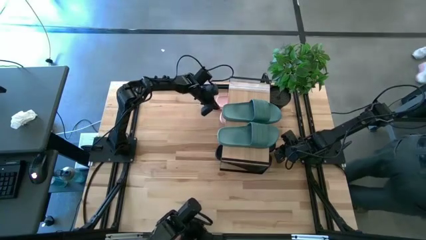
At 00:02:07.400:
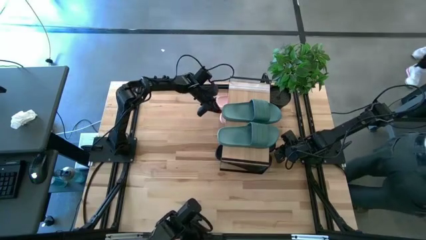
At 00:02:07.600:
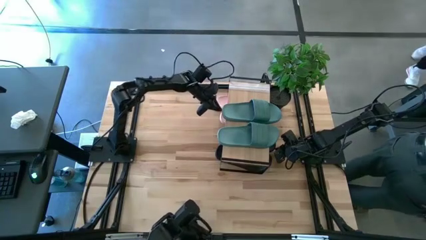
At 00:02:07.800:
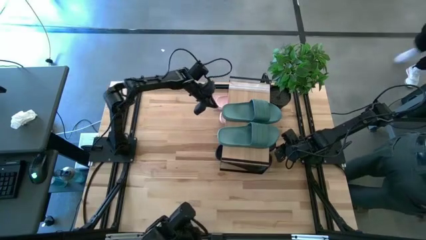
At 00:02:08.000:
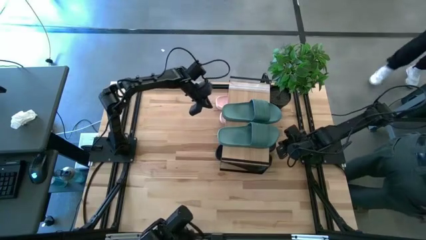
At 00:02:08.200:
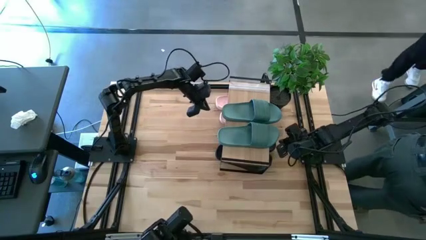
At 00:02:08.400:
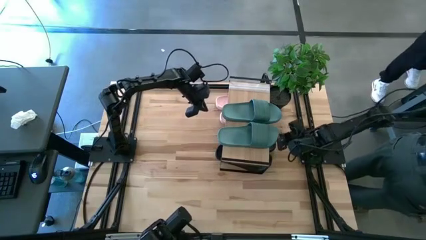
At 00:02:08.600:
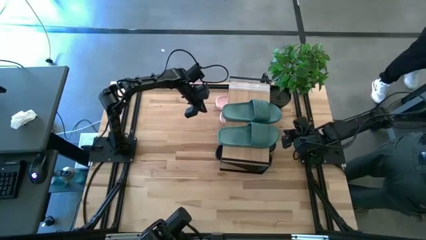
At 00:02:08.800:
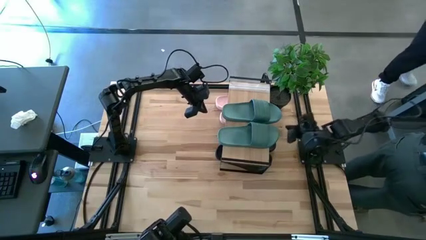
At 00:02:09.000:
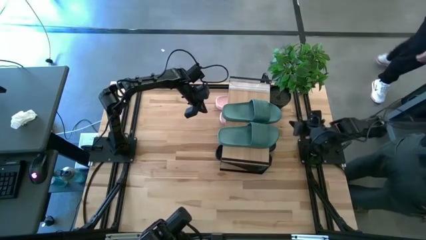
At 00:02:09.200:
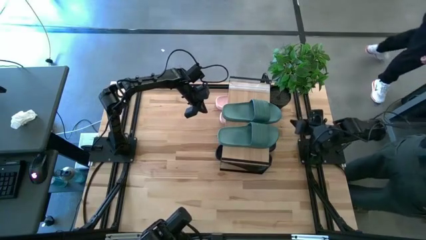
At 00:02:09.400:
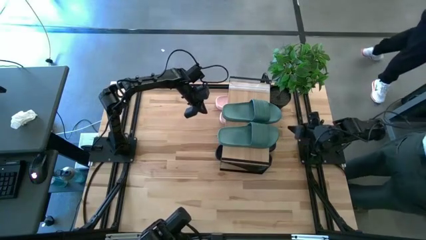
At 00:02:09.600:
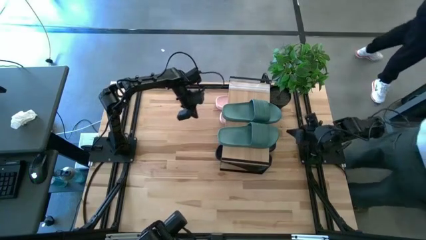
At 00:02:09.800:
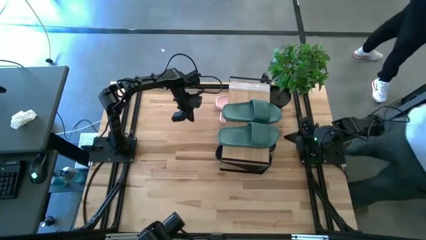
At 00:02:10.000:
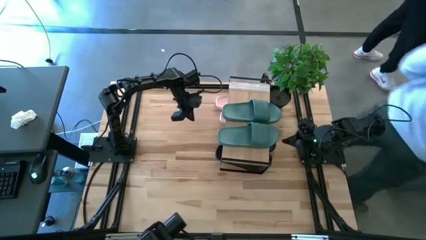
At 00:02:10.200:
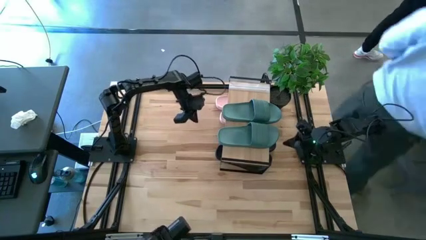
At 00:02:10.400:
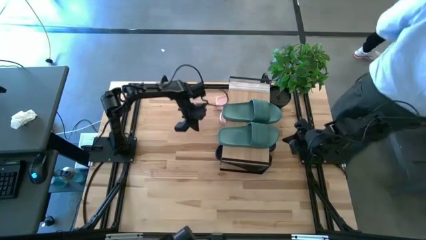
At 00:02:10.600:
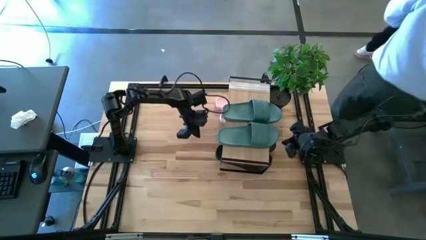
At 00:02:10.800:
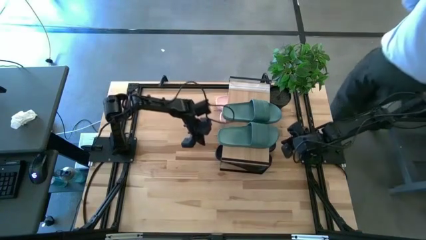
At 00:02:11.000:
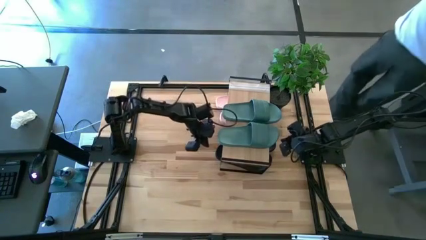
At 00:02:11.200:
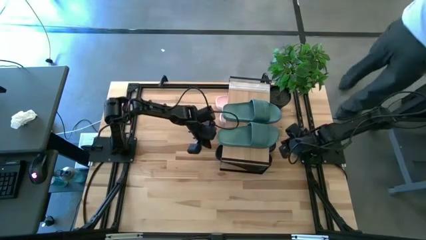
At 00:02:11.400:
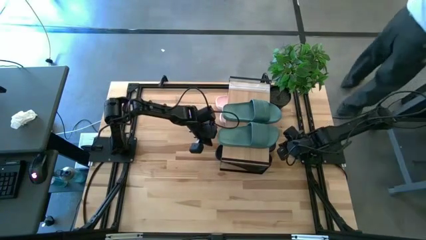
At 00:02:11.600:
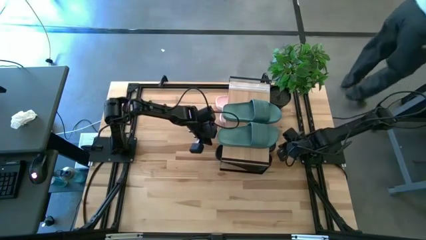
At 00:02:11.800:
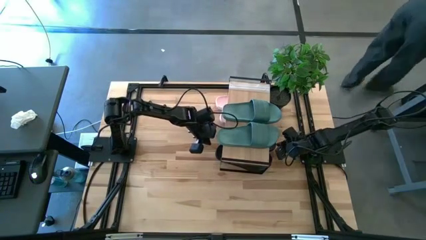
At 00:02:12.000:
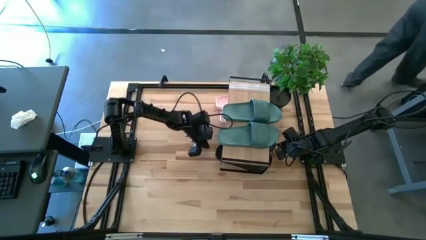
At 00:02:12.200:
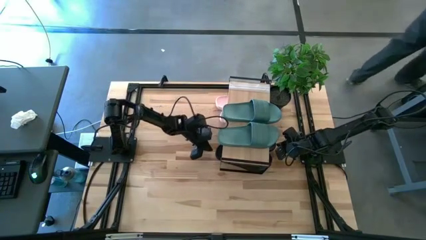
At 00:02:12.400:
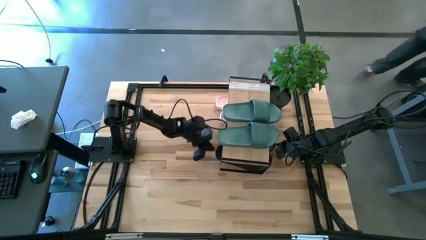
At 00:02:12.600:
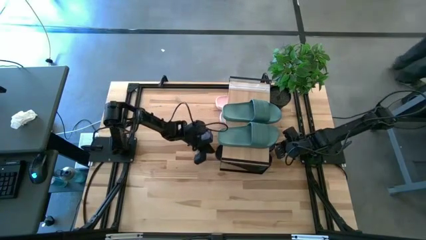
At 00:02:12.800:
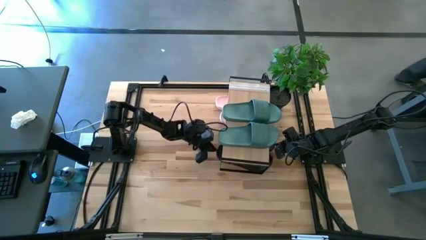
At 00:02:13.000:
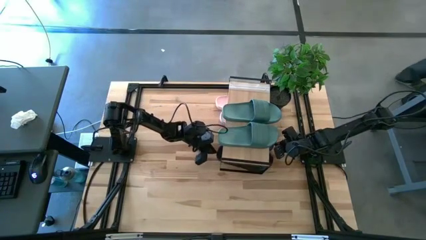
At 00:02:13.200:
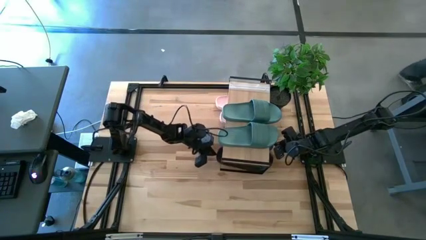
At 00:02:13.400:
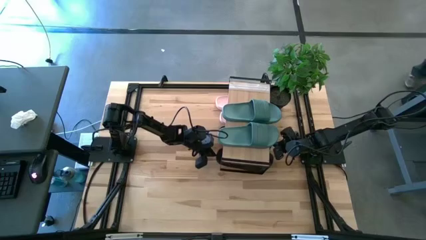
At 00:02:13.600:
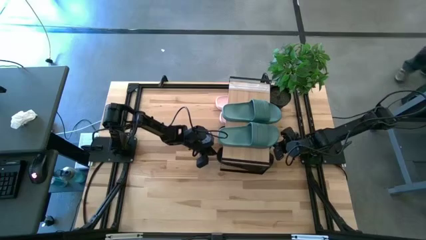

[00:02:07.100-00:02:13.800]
Task: Pick and place slides into the shelf
Adjust the top black slipper under the shelf

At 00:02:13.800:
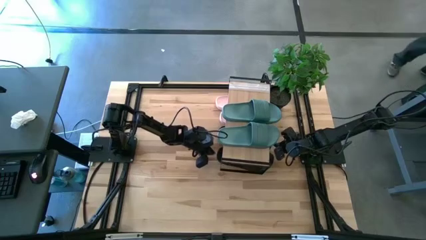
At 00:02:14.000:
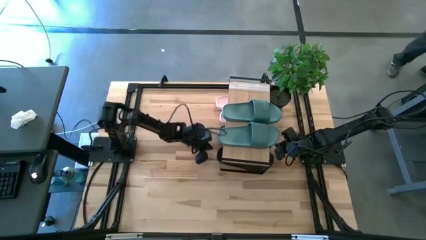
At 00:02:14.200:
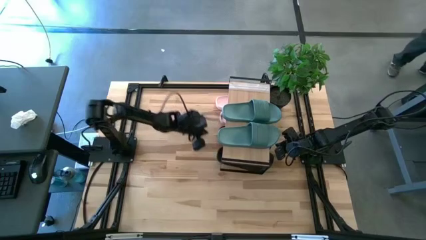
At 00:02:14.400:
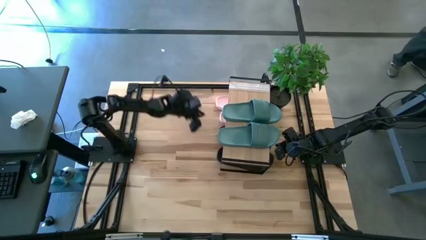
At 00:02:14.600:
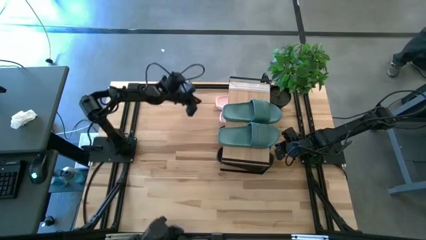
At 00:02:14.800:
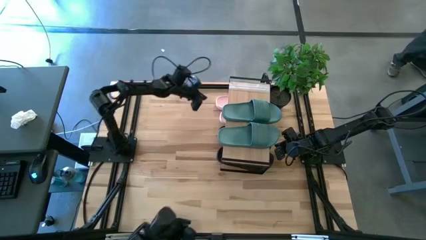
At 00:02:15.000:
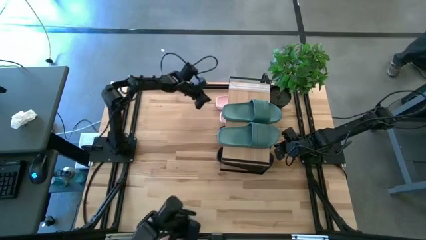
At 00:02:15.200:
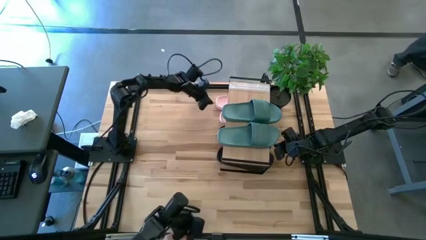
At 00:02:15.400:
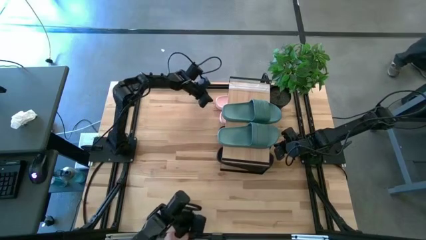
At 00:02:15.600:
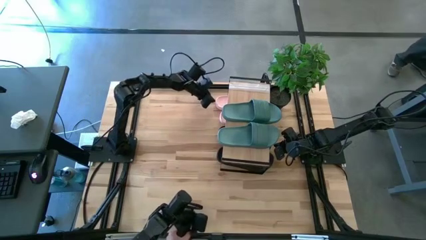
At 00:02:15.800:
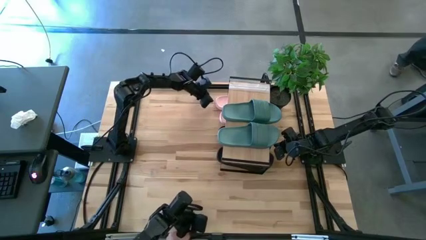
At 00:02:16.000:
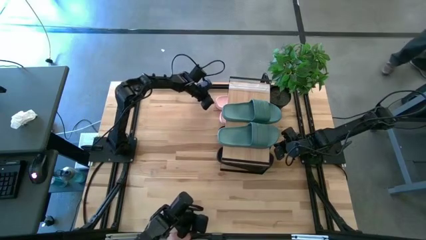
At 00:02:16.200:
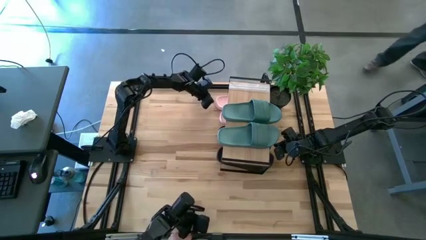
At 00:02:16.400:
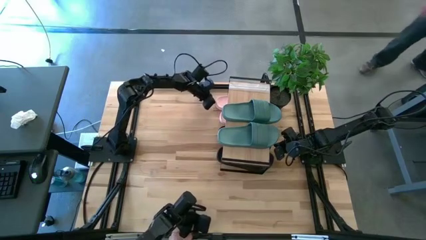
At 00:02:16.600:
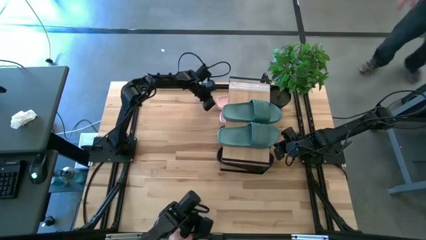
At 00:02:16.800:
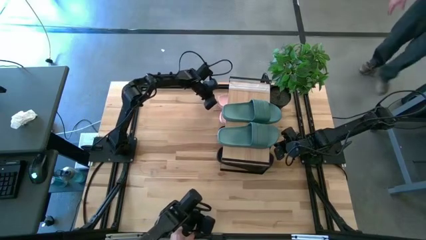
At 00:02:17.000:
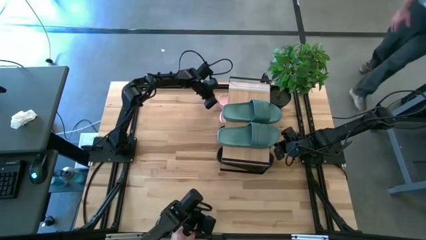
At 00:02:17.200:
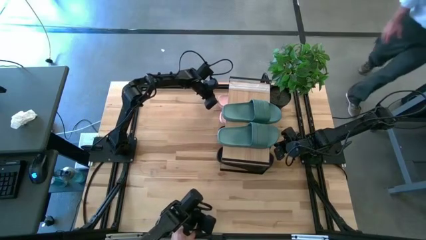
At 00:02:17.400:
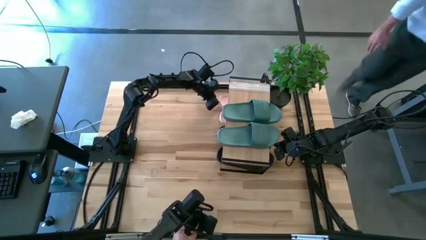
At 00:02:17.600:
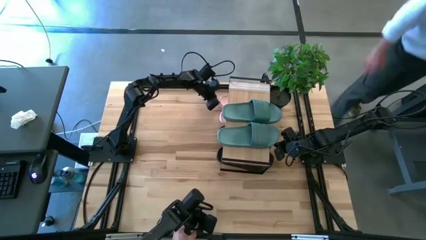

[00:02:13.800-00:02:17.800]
Adjust the top pink slipper under the shelf

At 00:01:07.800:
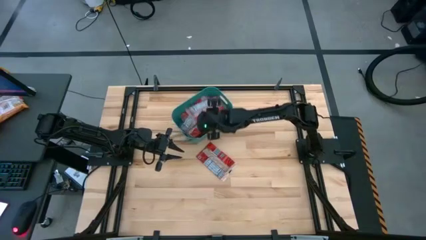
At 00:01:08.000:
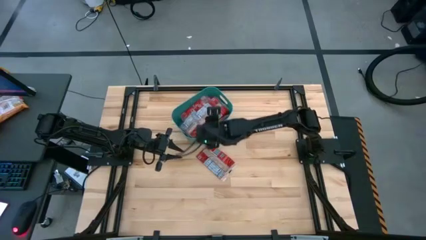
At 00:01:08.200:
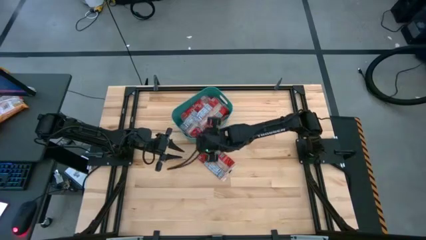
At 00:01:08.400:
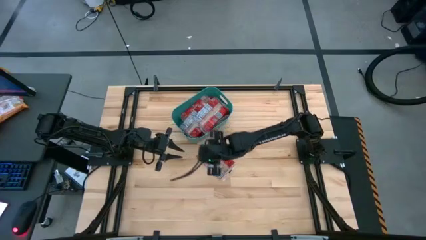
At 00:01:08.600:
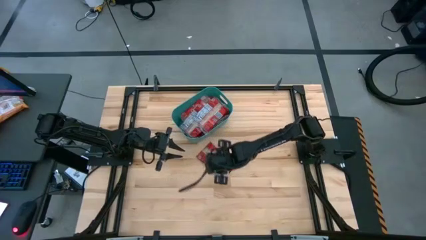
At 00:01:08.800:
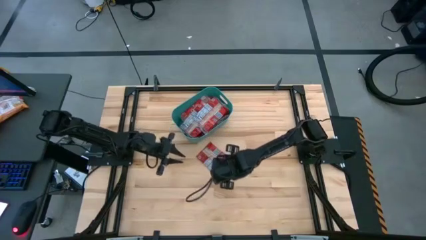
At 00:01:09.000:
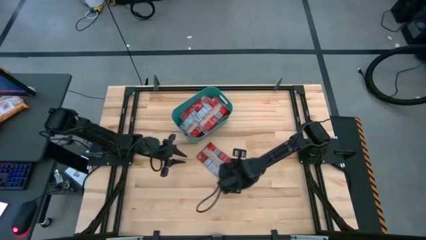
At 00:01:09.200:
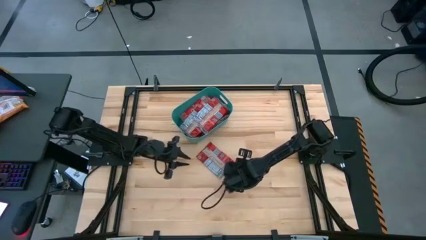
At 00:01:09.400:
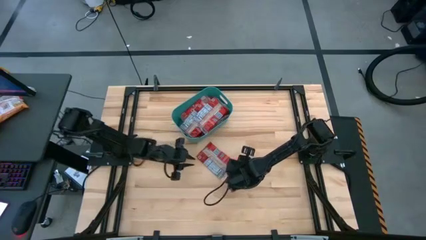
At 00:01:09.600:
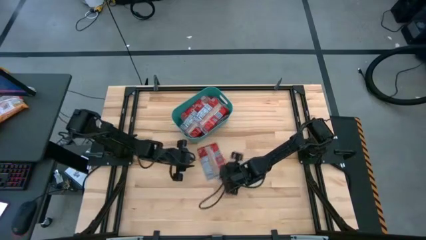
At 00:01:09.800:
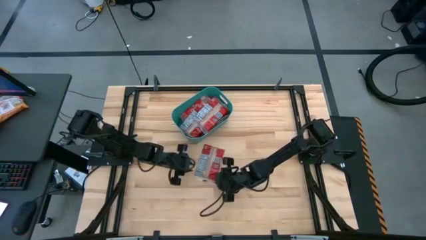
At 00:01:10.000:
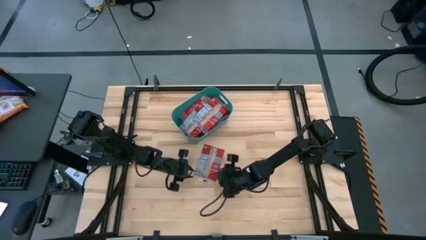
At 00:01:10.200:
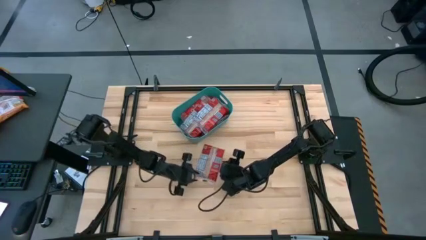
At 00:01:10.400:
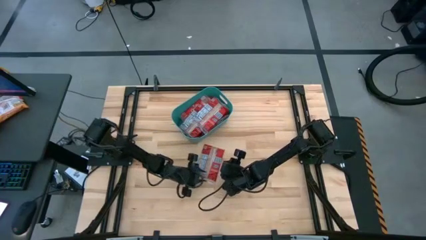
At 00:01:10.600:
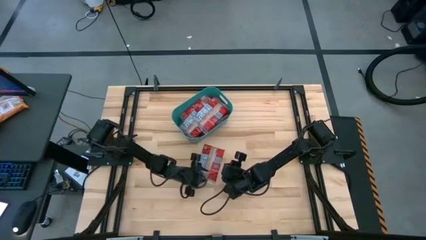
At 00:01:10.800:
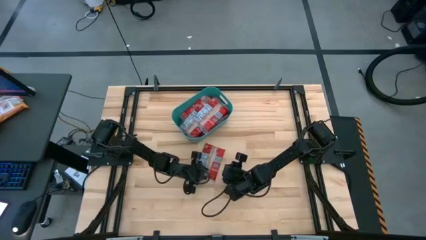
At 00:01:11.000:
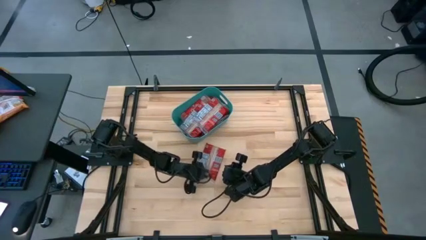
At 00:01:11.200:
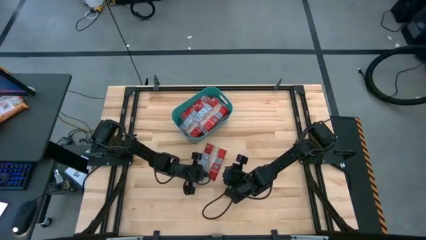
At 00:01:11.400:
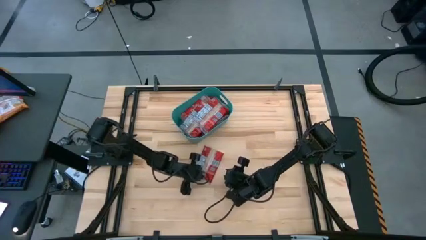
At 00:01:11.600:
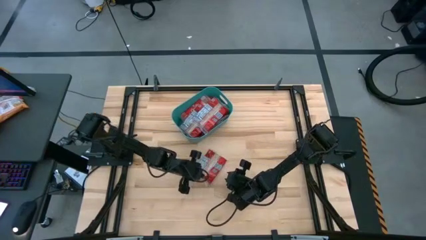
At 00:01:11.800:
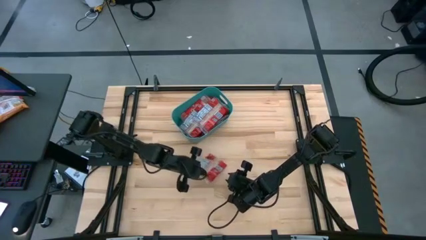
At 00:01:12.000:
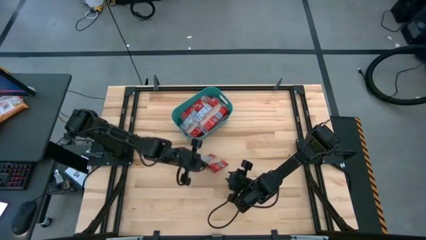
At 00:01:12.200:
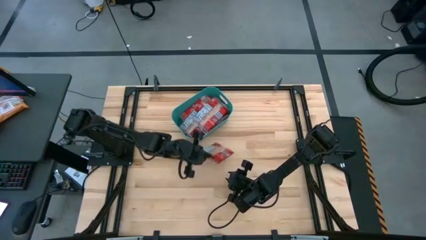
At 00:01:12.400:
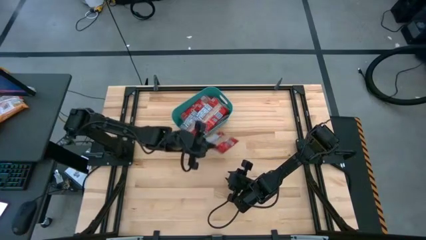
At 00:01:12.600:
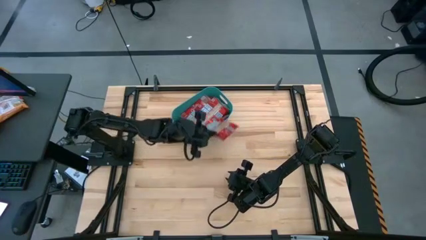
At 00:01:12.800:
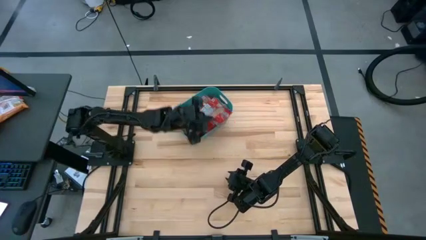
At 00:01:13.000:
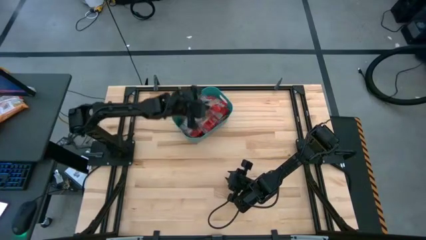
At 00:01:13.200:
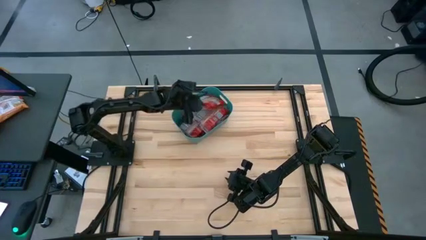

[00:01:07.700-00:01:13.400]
Task: Sort popcorn bags into baskets
Put the red popcorn bag into the green container
